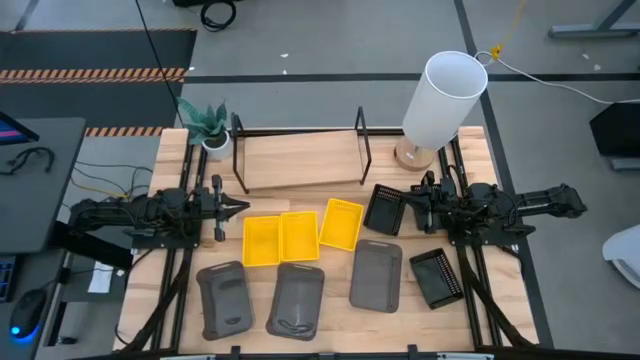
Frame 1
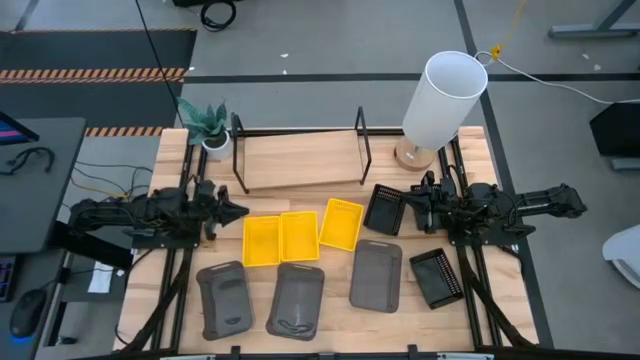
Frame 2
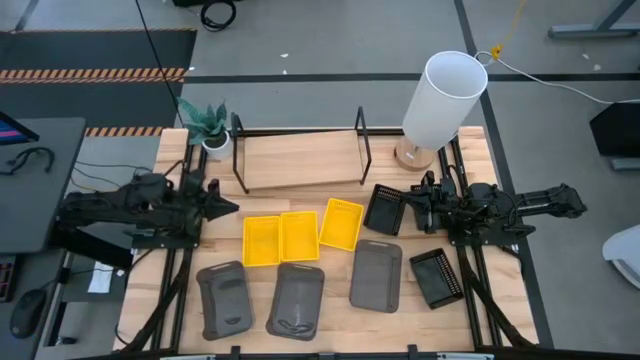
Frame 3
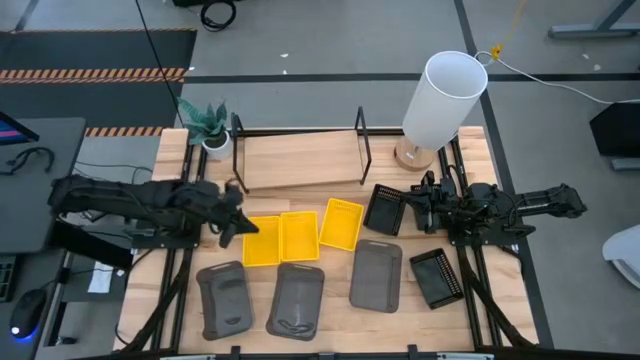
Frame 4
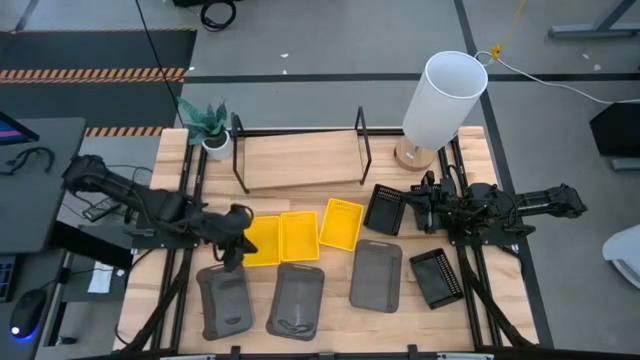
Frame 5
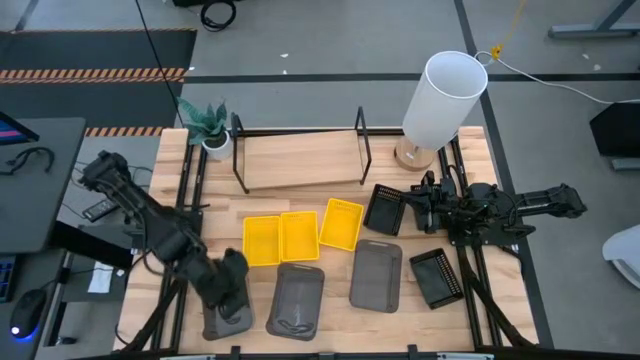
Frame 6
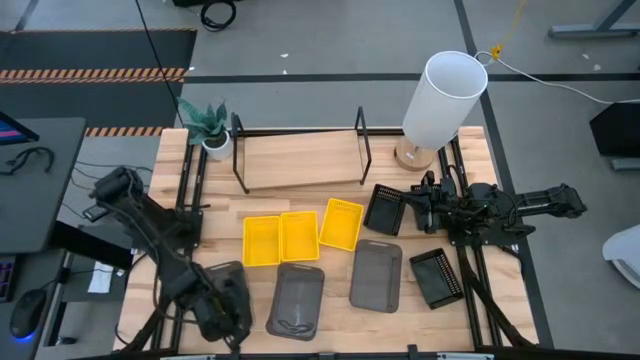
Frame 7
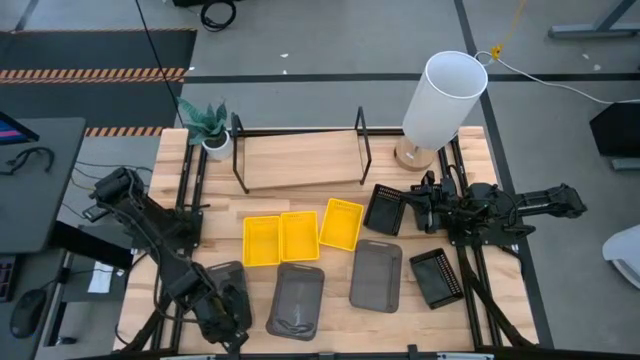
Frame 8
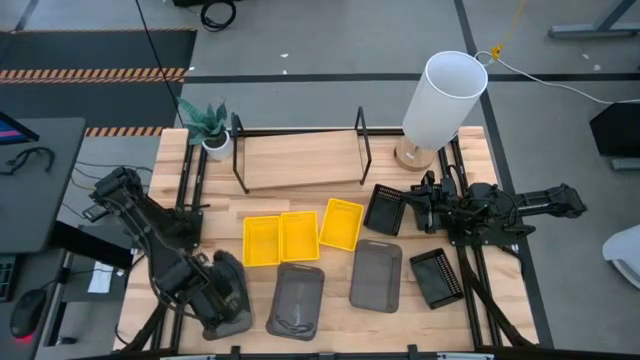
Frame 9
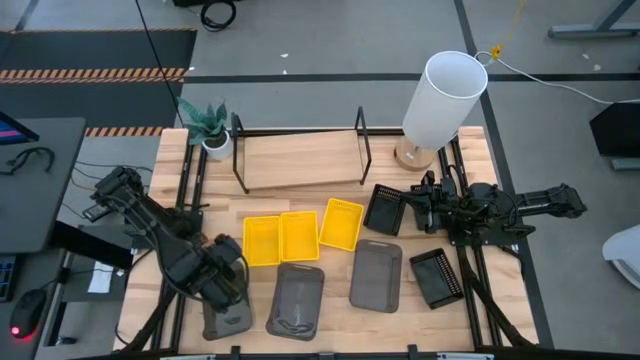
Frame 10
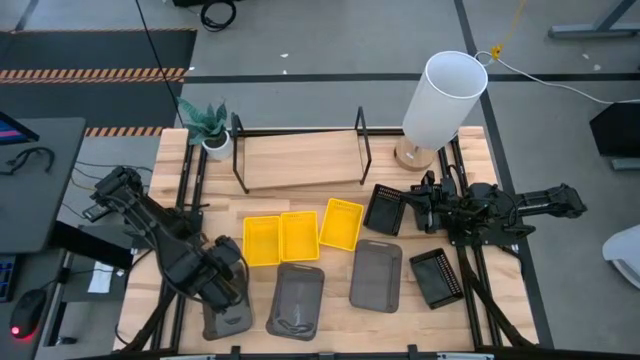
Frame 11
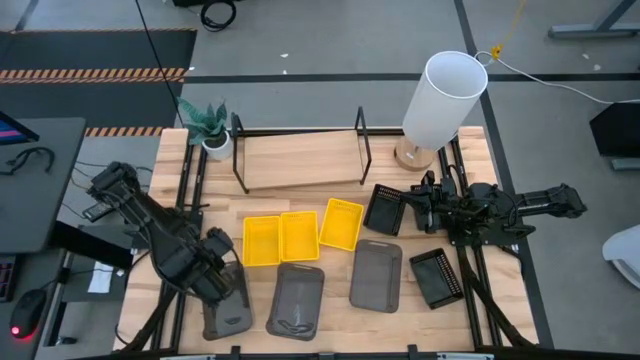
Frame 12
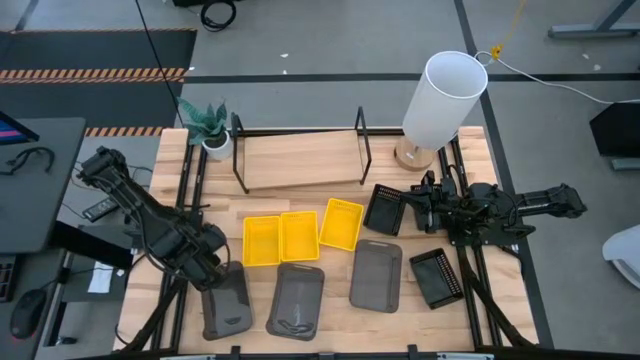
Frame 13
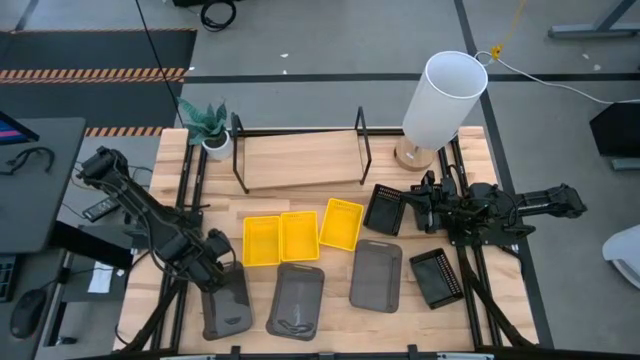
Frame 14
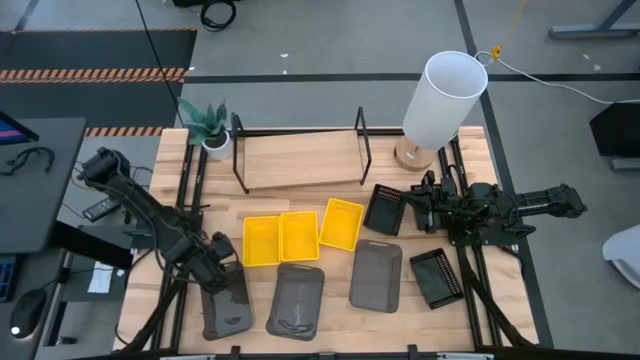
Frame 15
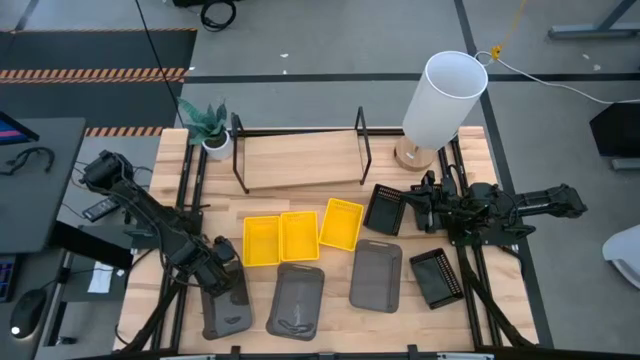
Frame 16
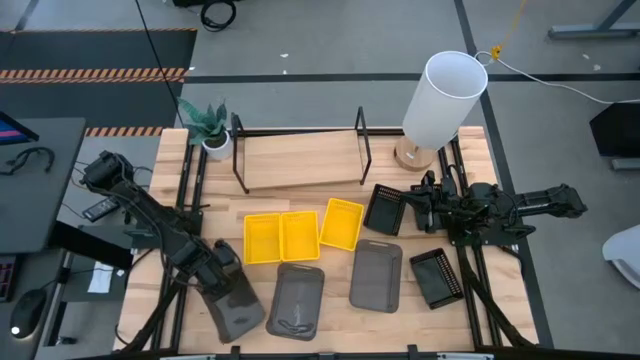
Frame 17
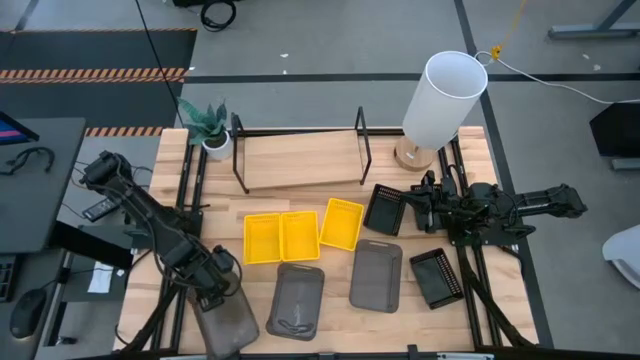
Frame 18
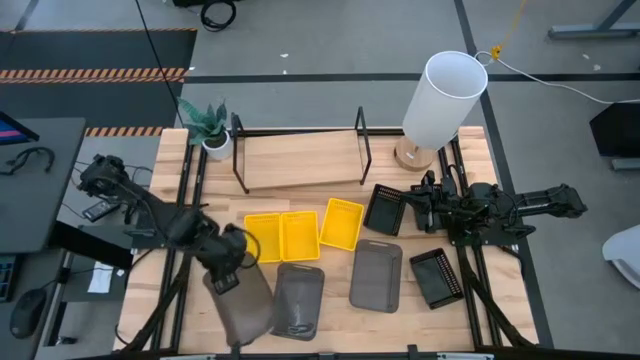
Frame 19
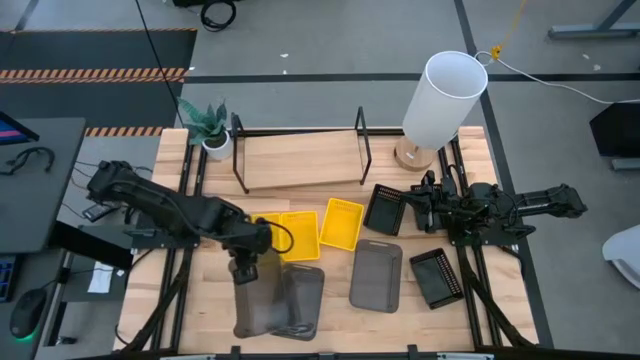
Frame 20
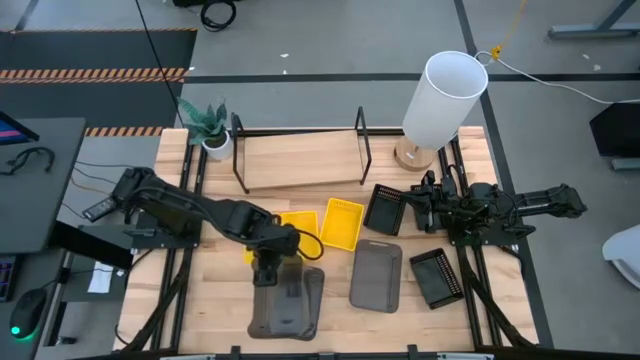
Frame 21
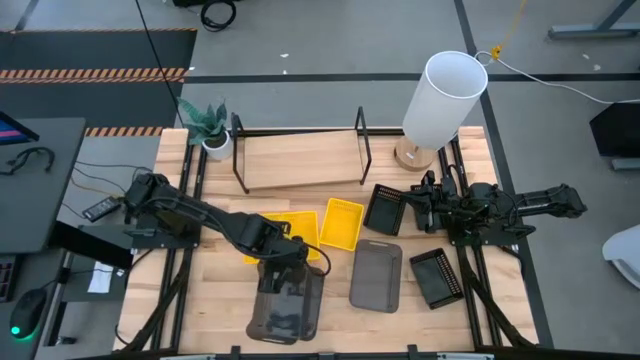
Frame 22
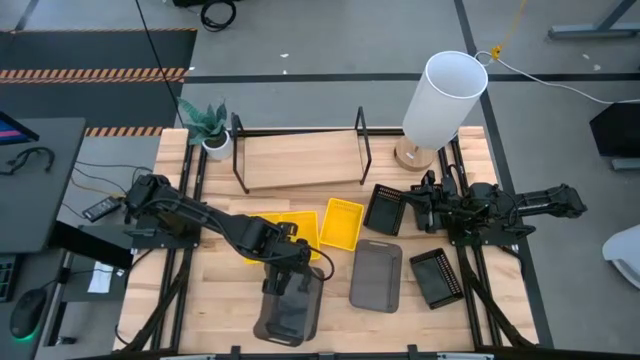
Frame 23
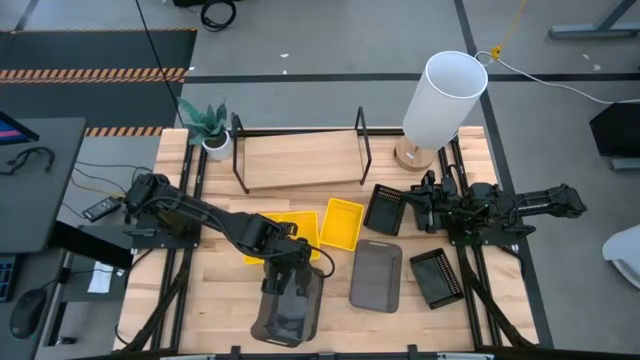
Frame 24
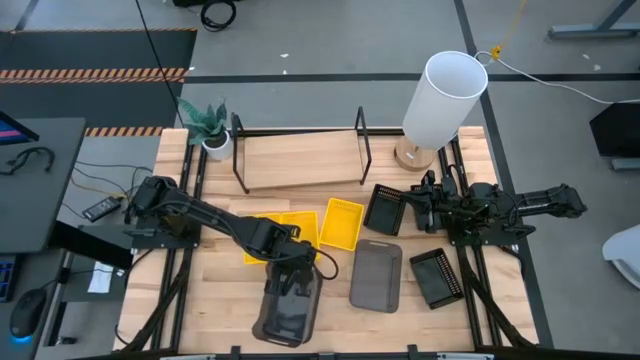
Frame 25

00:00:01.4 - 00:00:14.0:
Task: Stack baskets on shelf by color
Stack the left large black bin on top of the middle large black bin

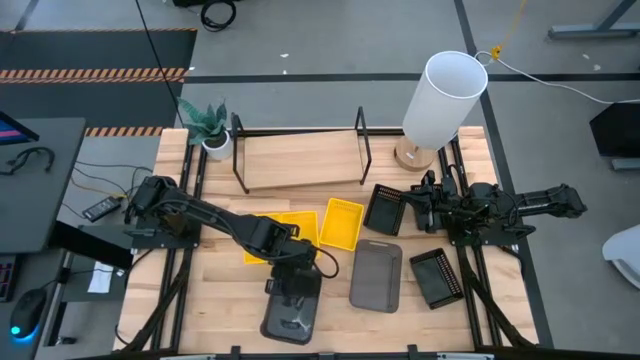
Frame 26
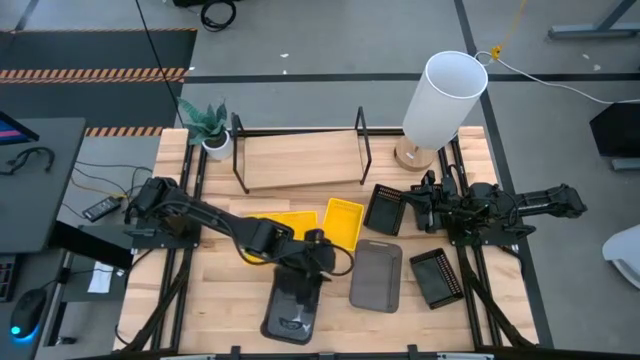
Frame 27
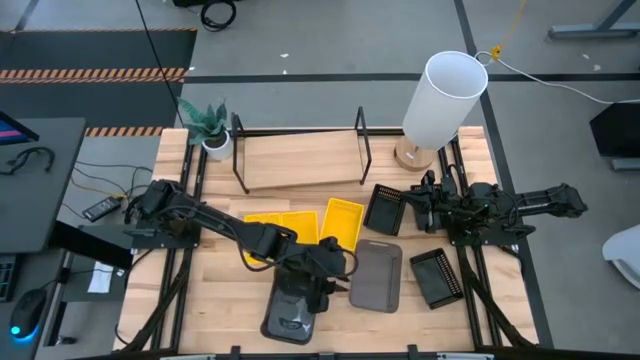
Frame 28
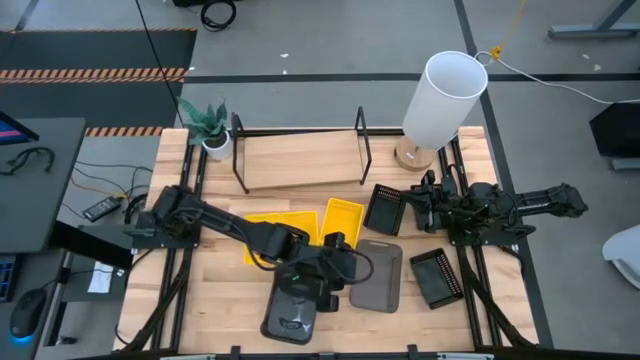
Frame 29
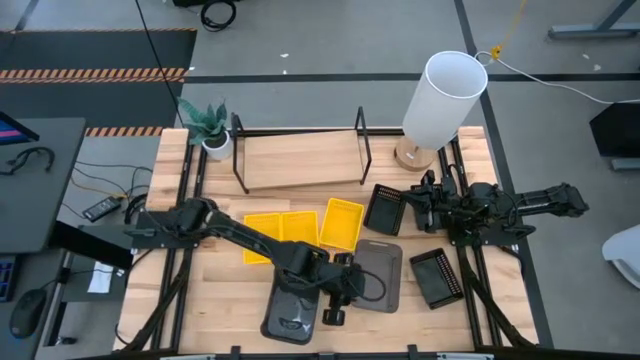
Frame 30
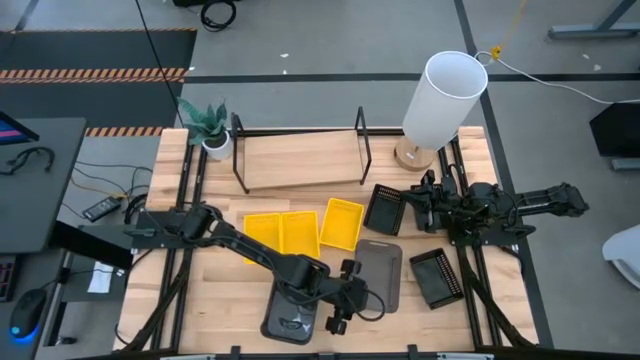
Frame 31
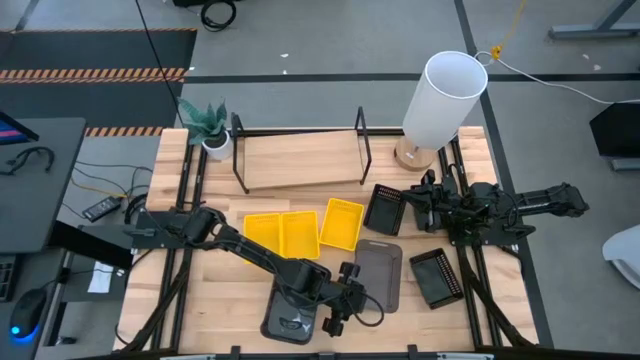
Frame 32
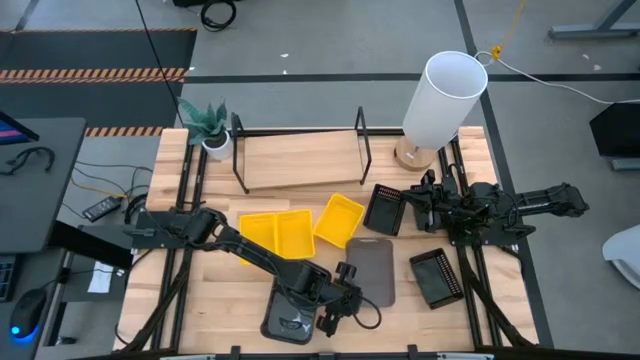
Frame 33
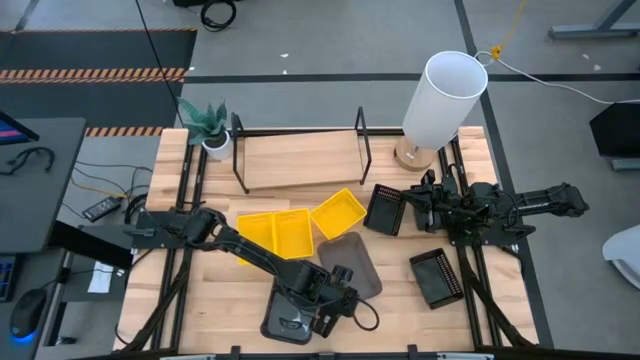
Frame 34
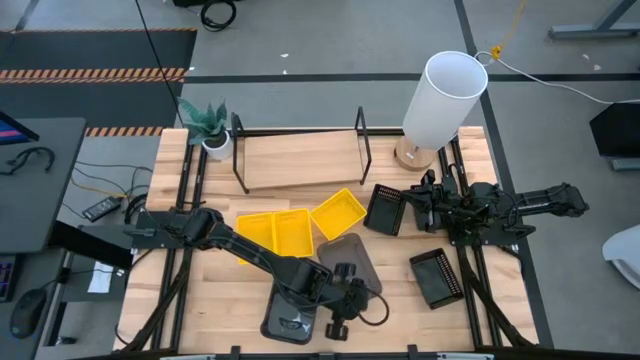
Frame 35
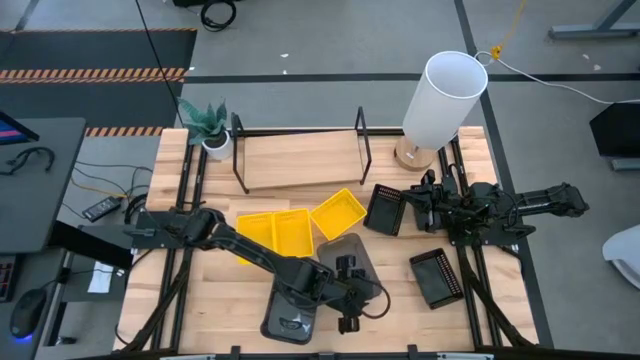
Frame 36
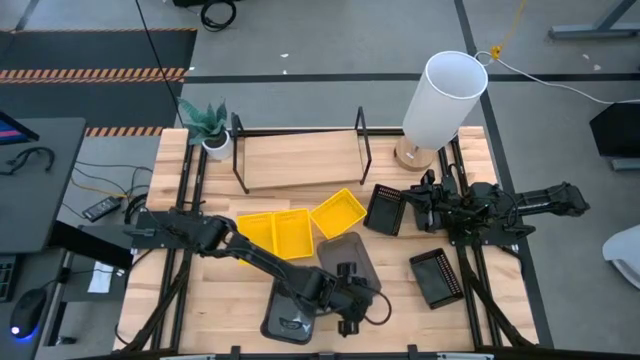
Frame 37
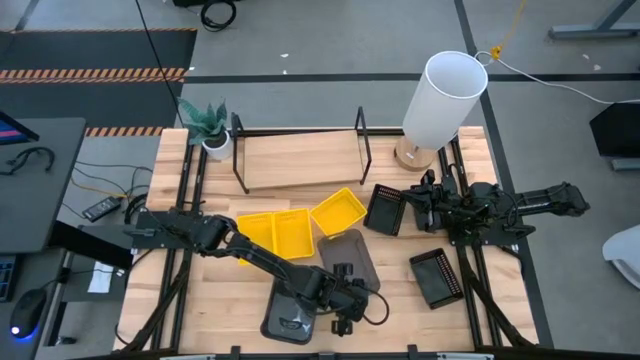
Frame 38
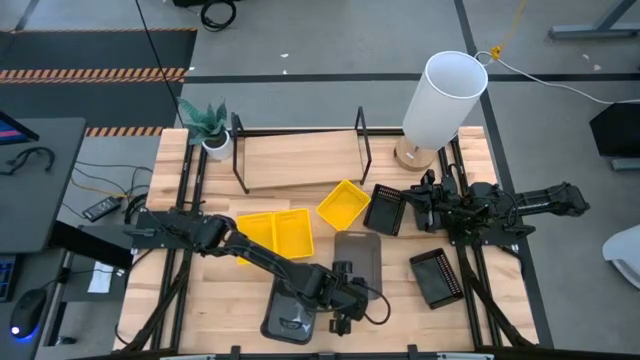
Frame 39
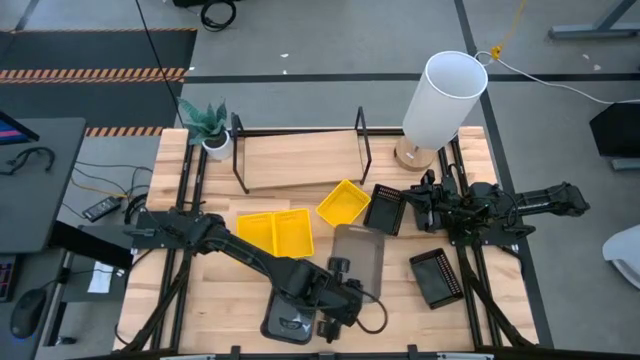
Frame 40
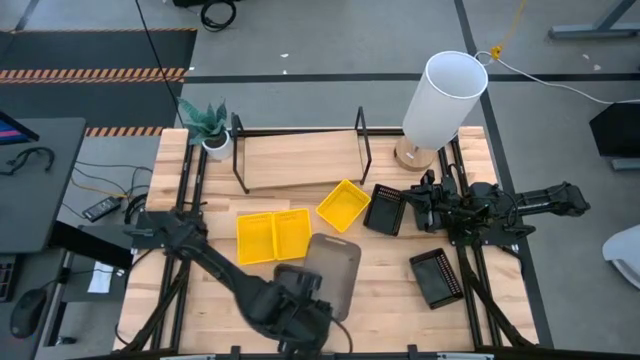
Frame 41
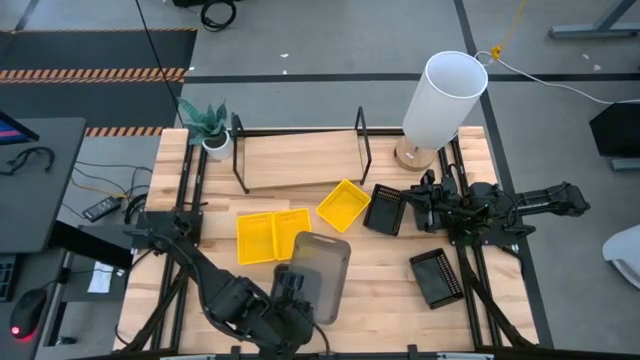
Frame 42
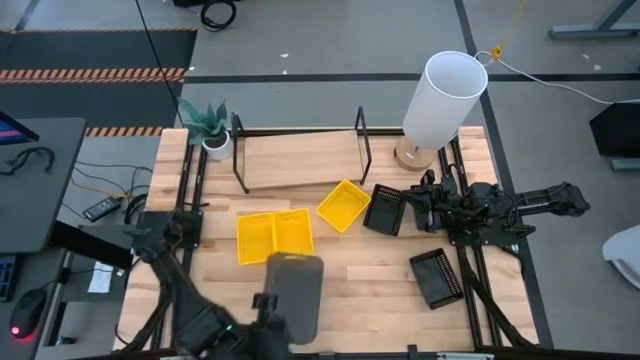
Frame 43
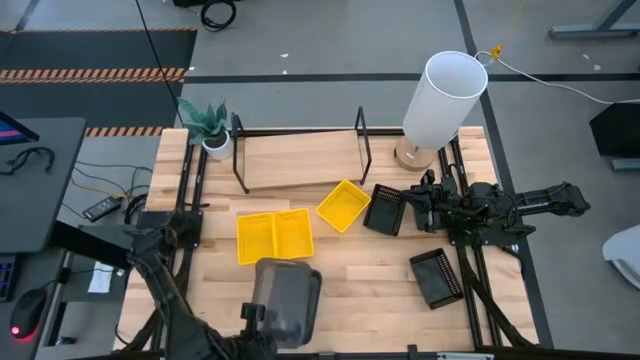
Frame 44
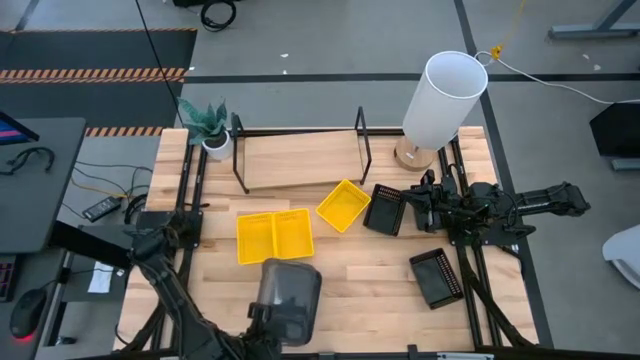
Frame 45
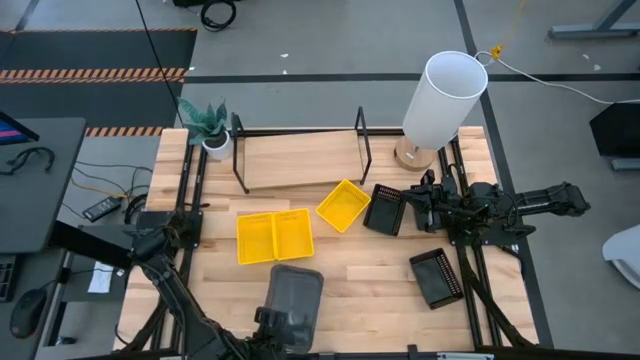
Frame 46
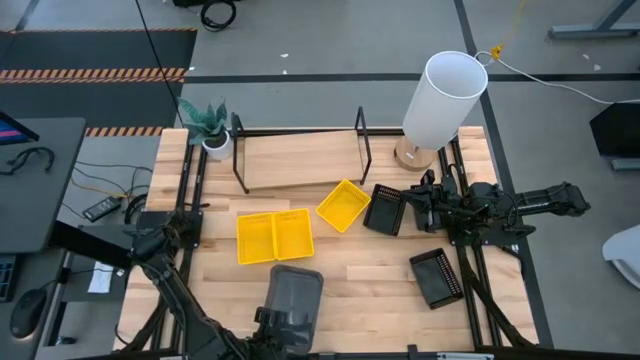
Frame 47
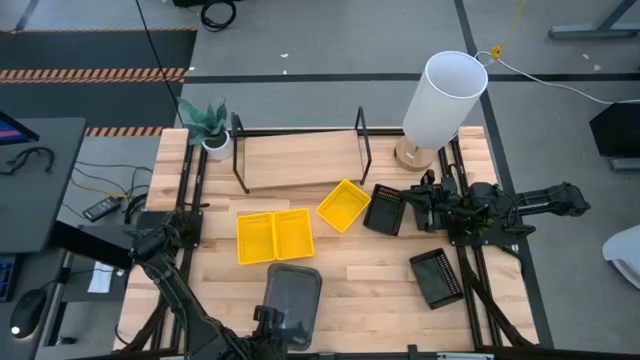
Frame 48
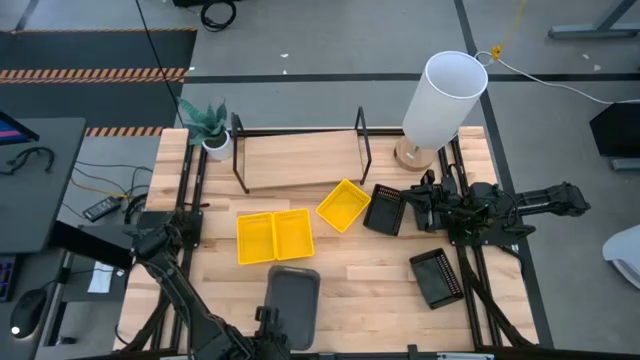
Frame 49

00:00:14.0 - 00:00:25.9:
Stack the right large black bin on top of the left large black bin
